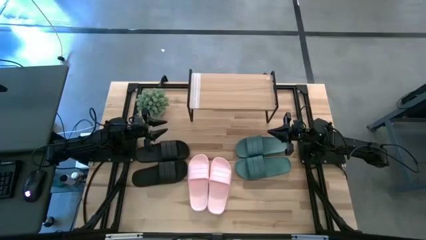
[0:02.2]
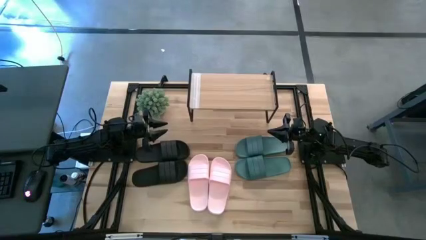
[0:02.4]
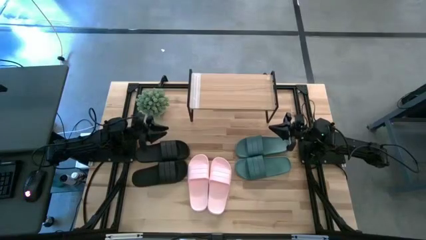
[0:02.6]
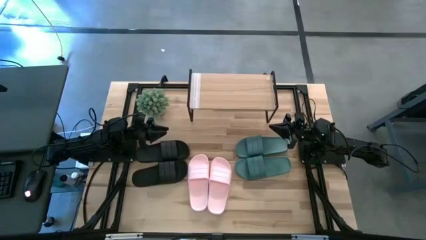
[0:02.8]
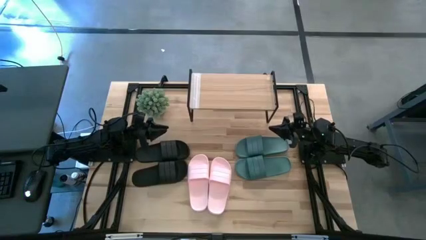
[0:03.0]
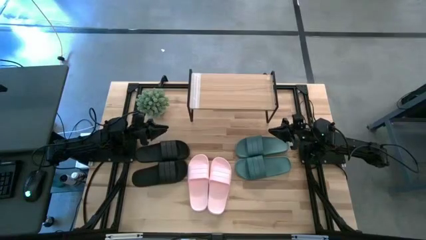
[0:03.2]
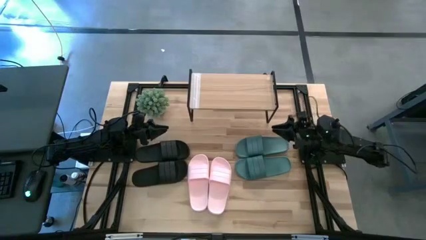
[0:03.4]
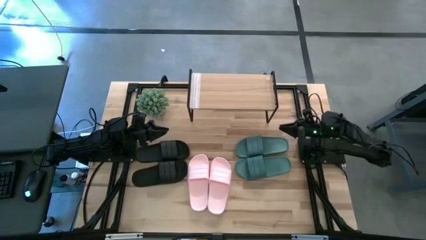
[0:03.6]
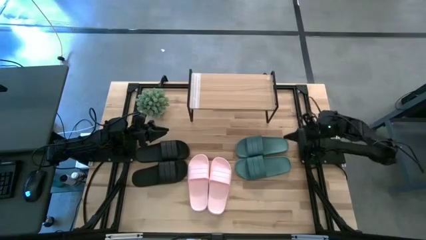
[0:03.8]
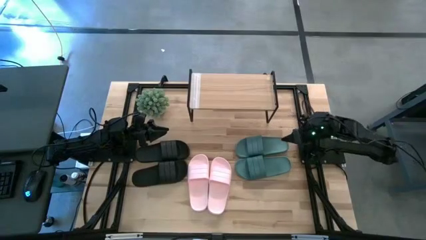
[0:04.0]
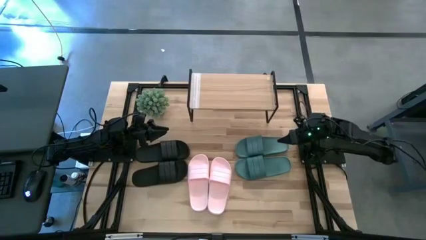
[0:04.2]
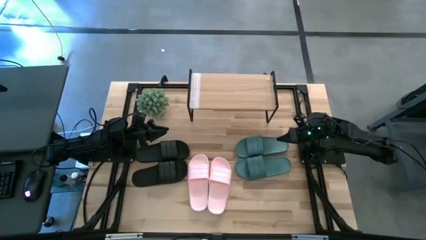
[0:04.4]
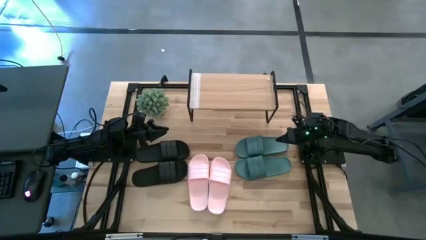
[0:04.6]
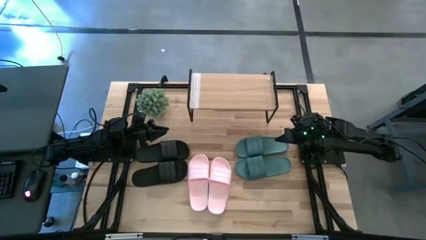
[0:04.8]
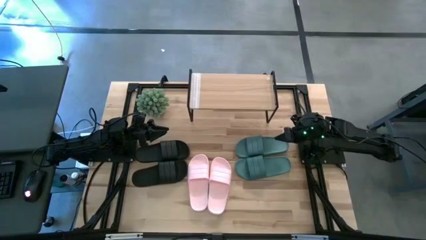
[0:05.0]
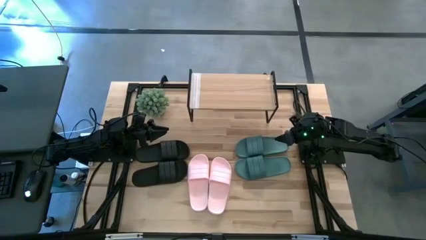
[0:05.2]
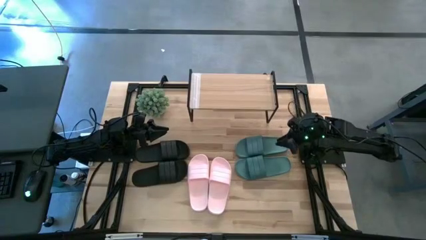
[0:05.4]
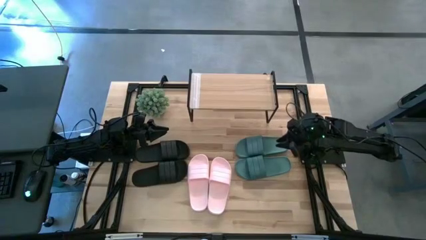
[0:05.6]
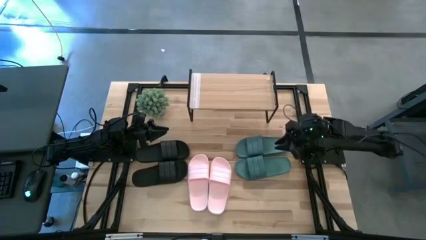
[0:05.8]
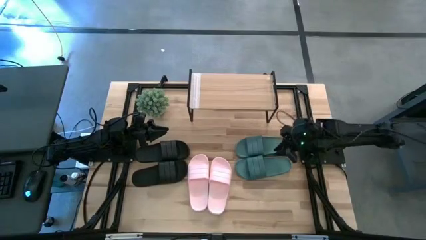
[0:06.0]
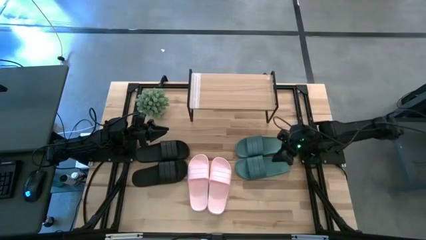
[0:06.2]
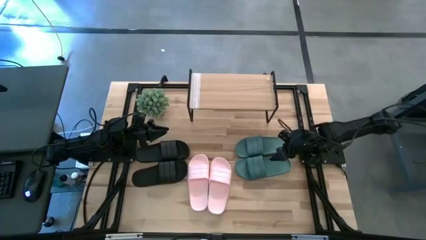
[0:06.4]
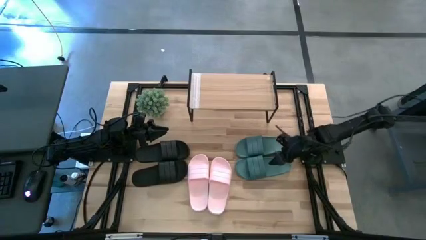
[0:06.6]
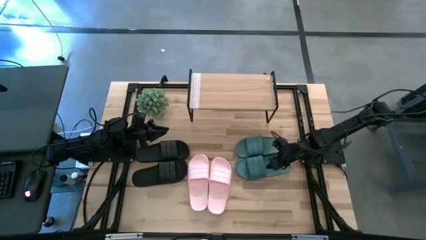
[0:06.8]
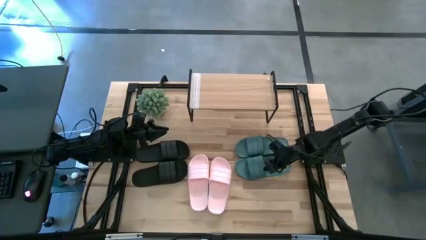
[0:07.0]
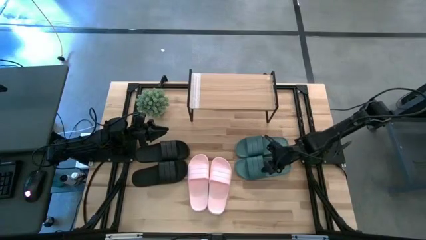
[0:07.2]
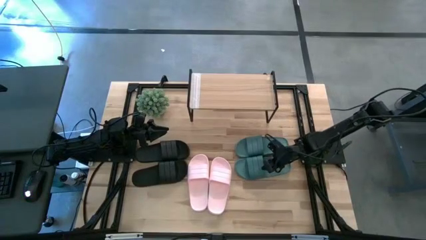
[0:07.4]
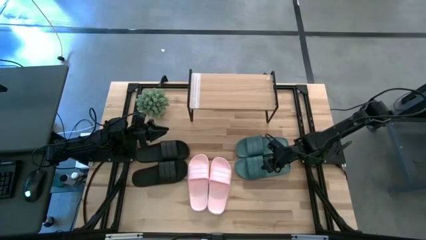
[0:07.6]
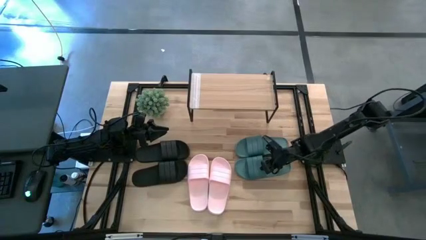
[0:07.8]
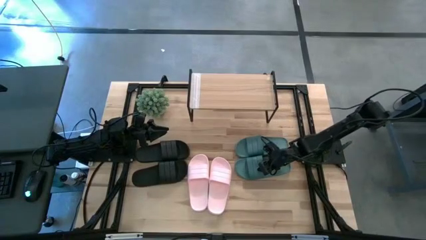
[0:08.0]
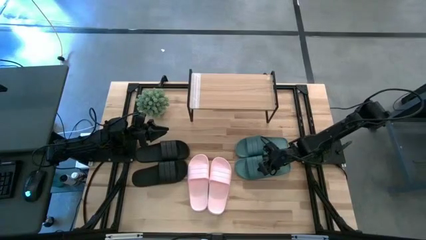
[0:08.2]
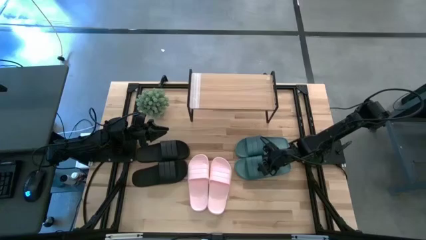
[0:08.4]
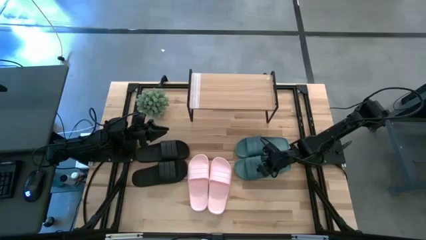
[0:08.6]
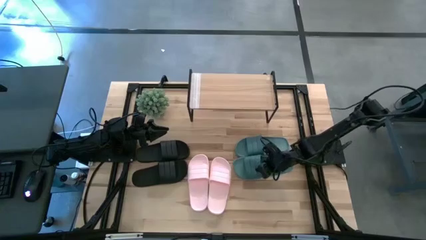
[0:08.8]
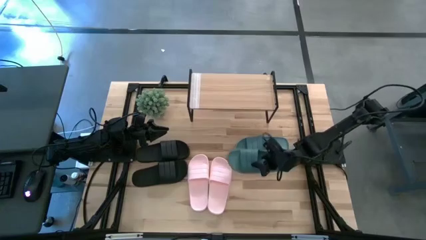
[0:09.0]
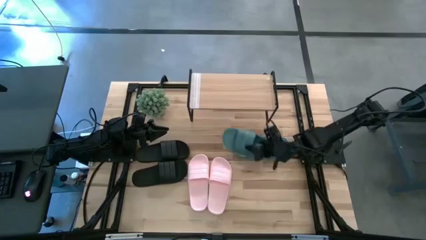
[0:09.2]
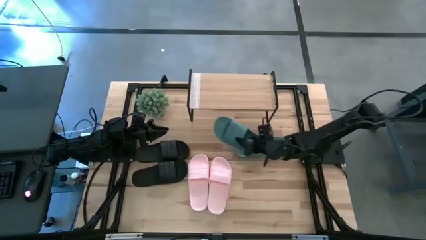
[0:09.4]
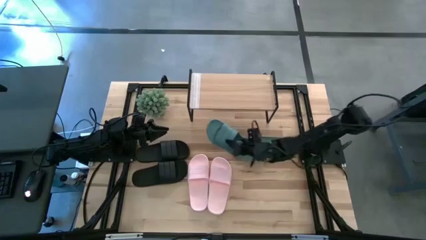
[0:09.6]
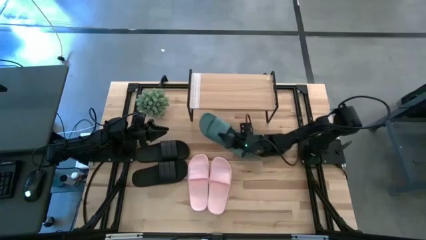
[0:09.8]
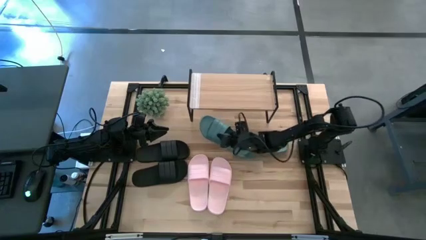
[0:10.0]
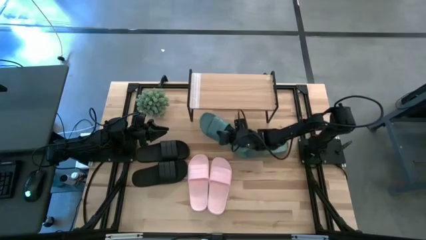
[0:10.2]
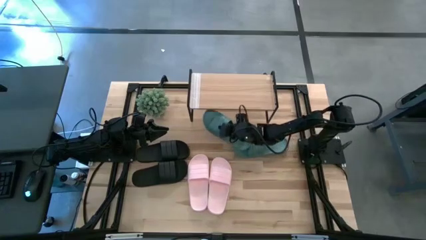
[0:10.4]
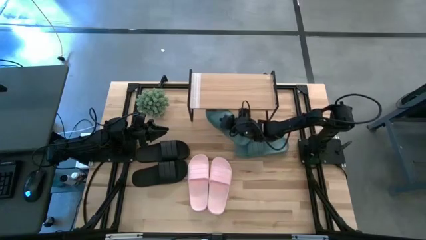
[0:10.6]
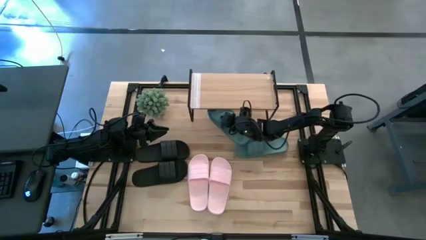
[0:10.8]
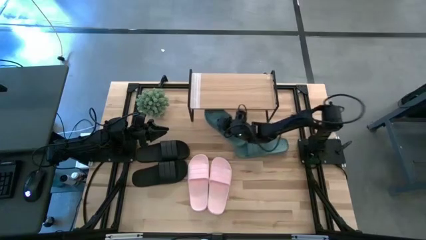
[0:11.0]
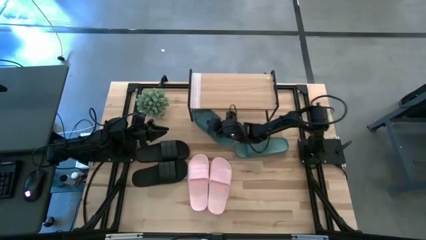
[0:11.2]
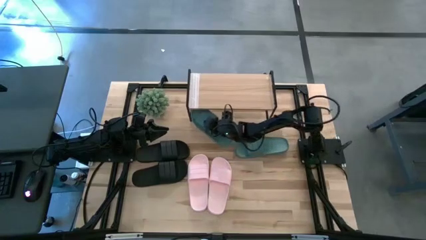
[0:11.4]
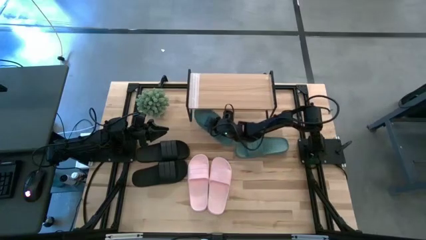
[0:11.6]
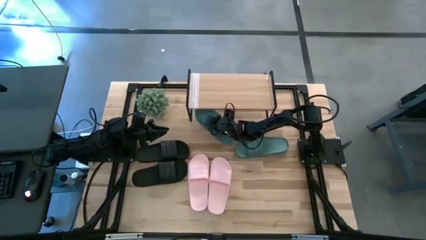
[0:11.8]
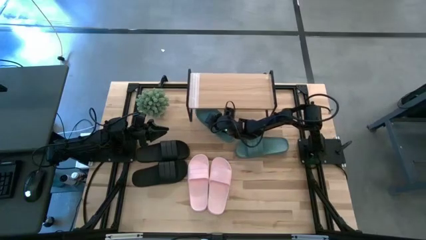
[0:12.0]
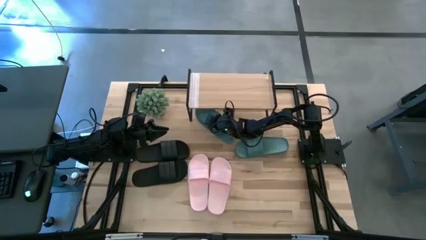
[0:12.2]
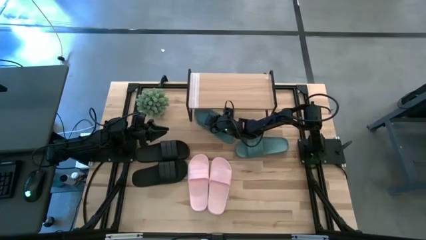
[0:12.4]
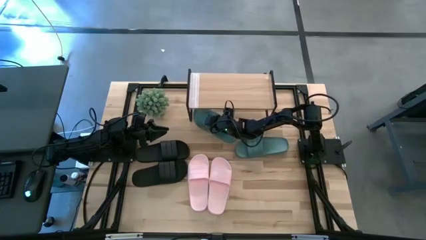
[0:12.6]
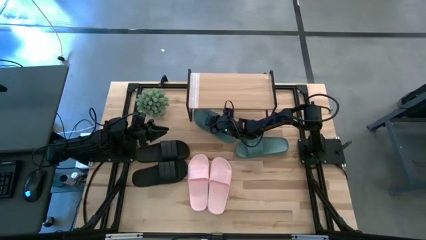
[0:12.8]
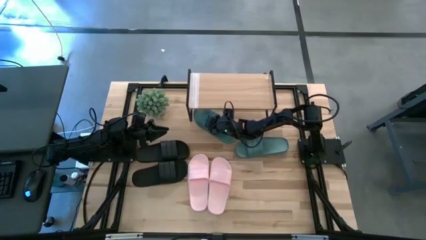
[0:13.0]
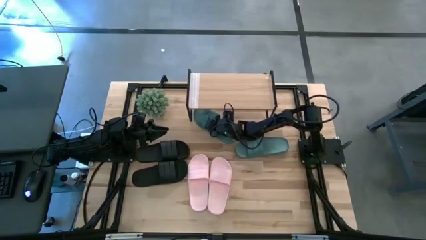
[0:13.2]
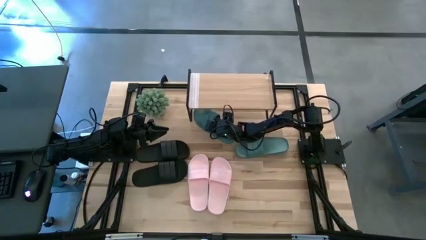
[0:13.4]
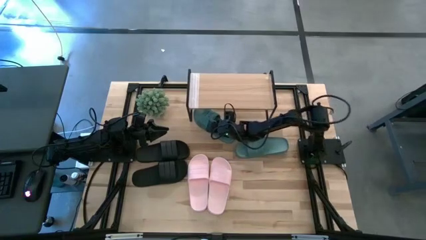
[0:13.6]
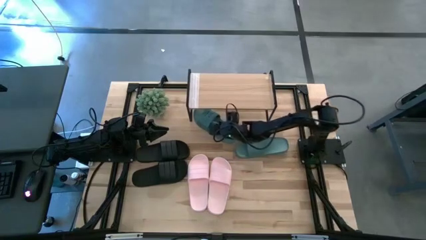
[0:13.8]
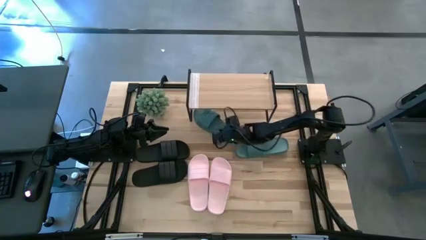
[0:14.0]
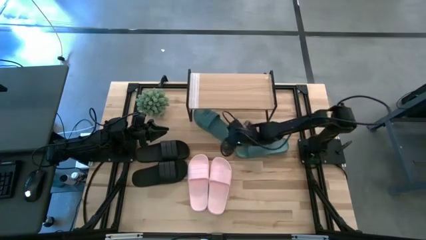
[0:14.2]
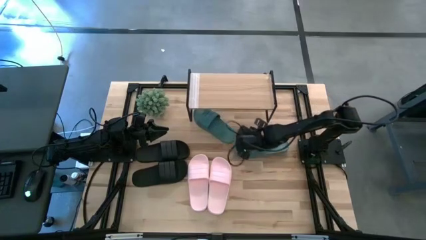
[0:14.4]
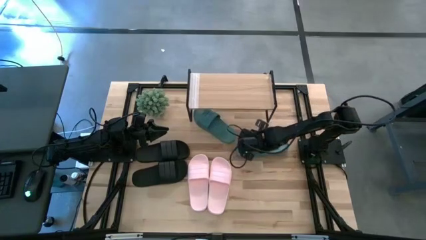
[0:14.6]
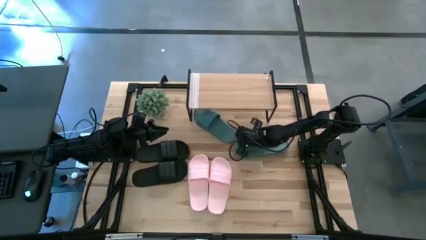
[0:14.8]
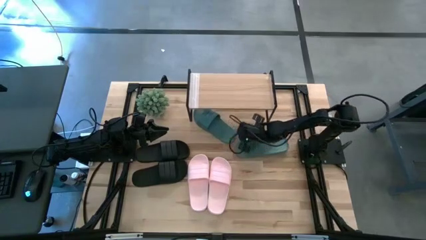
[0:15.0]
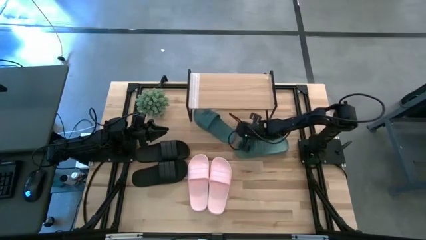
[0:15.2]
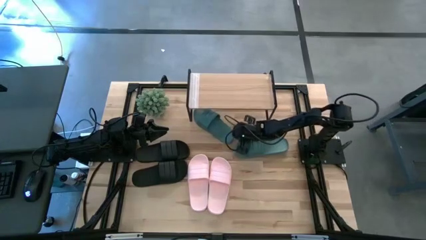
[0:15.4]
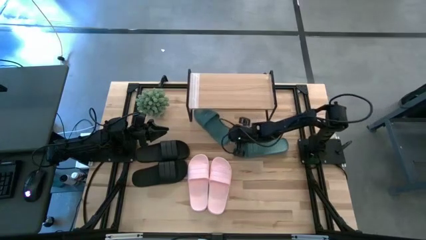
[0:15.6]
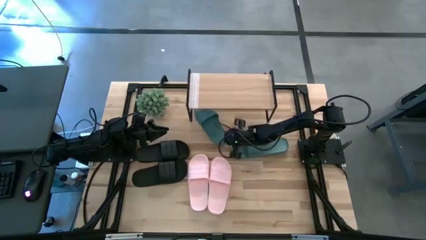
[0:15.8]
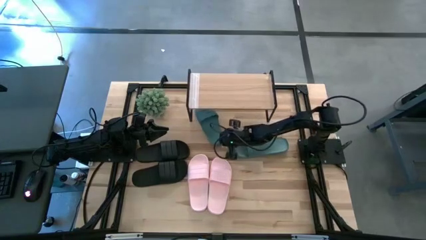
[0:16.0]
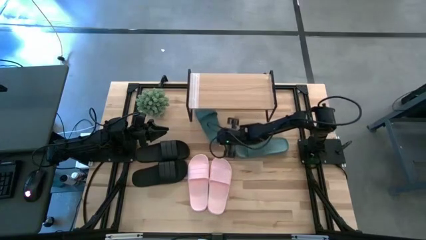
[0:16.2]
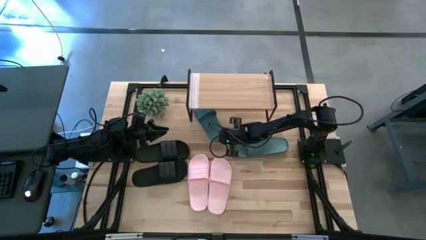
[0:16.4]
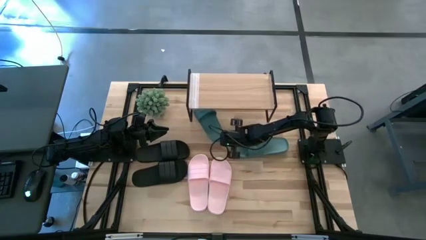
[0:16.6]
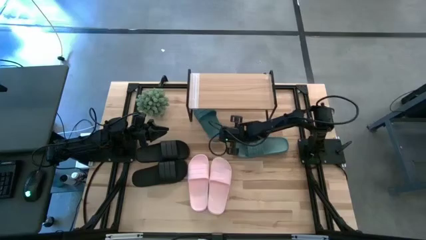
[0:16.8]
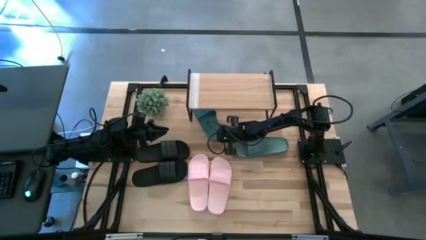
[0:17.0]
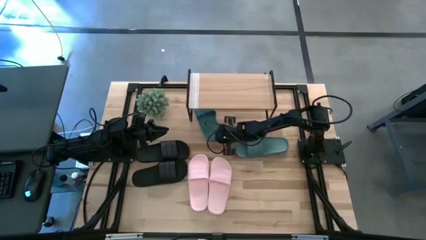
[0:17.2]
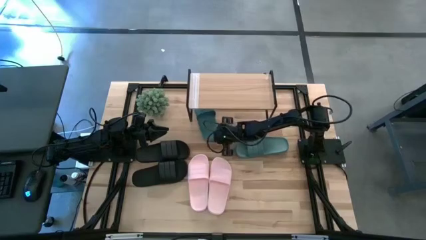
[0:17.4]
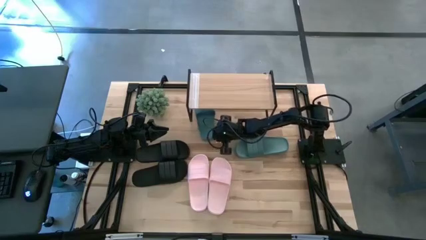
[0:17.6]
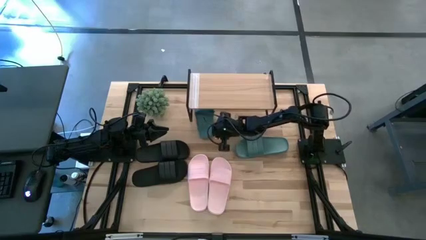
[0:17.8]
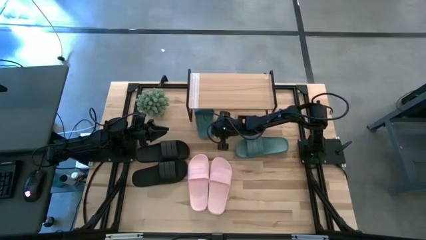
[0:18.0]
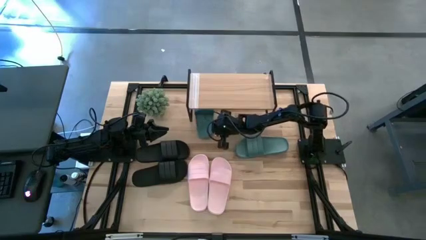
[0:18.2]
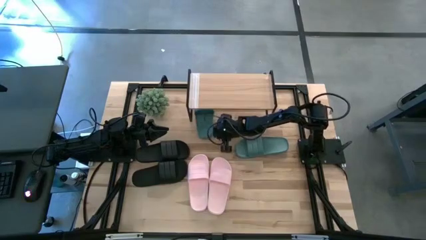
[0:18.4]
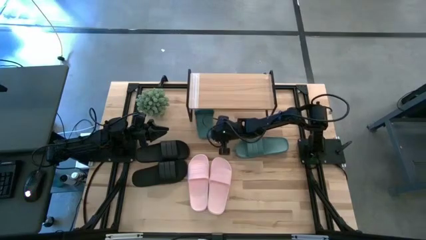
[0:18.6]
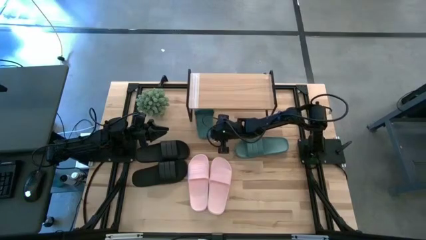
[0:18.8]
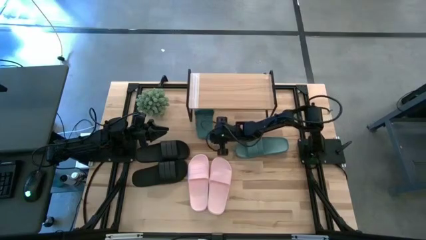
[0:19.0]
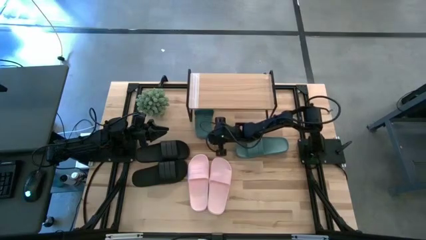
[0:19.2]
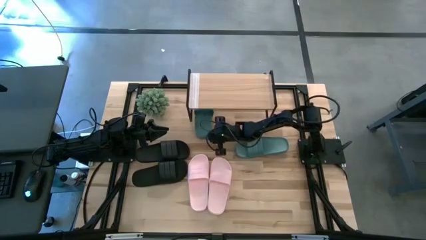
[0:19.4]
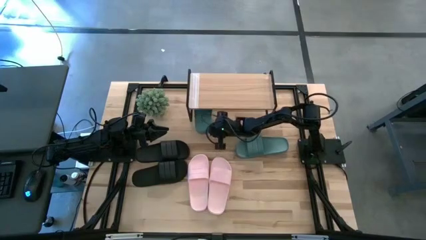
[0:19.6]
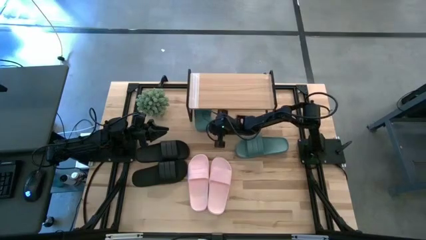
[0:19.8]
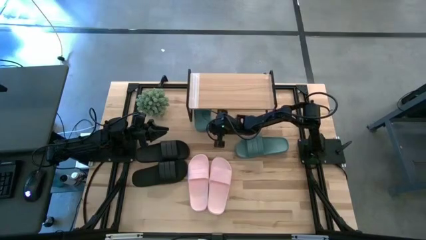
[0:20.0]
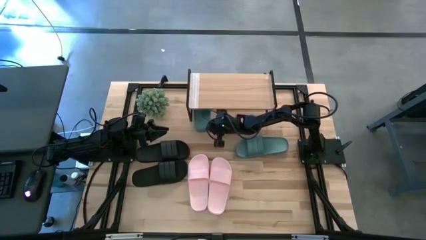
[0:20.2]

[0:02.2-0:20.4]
Task: Pick and place slides into the shelf
Put the bottom green slides under the shelf
